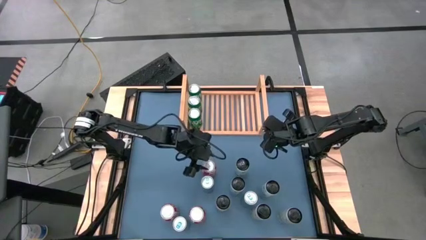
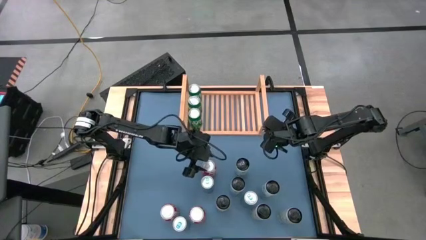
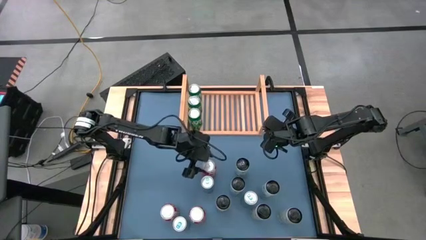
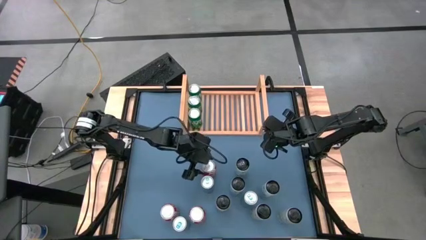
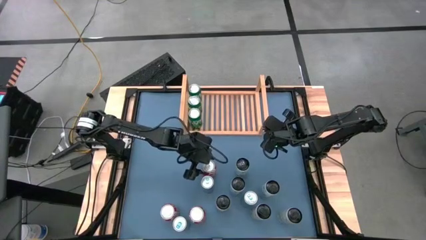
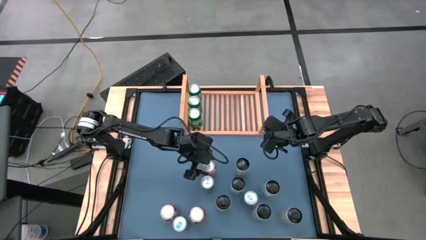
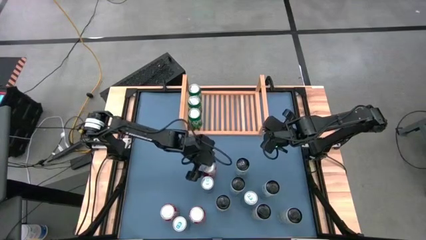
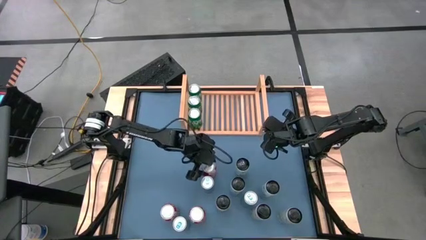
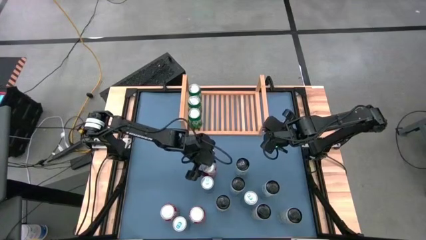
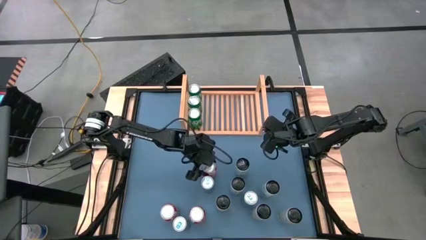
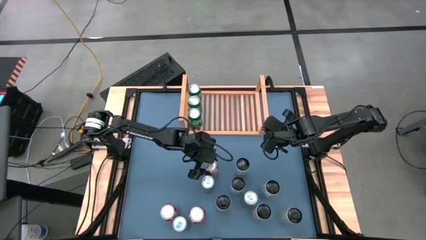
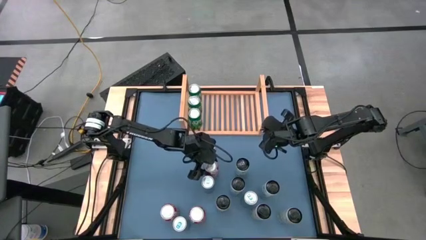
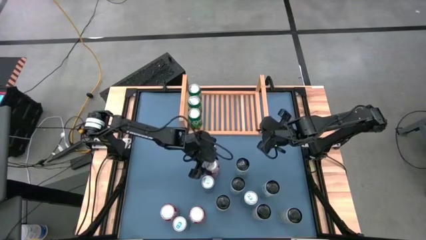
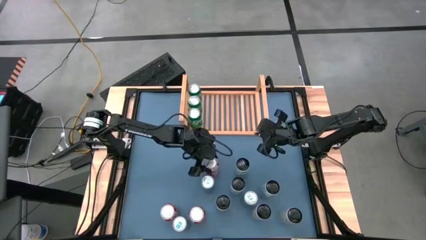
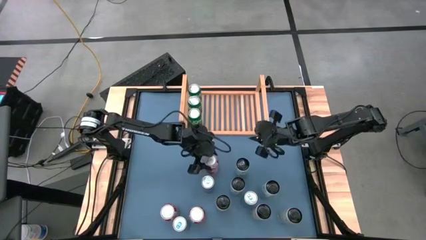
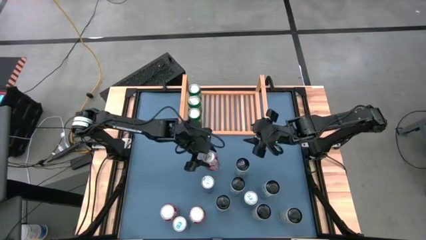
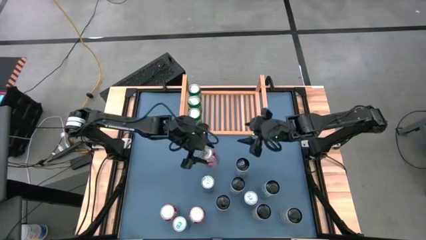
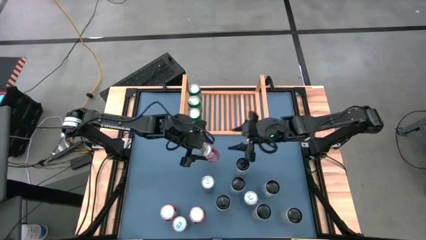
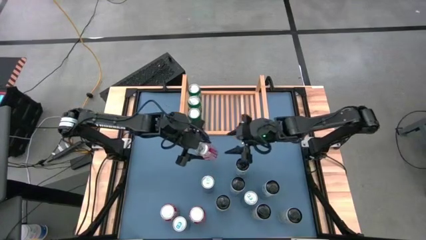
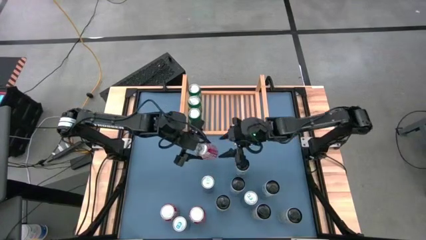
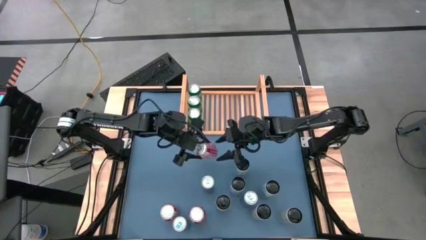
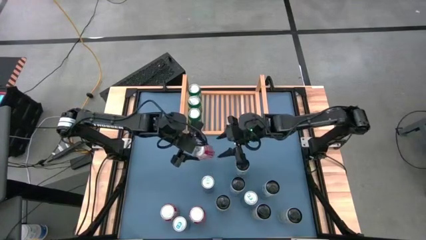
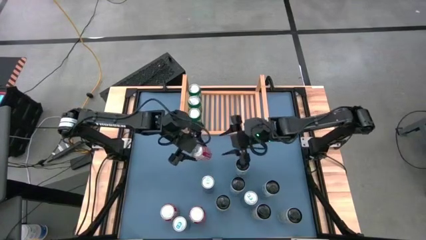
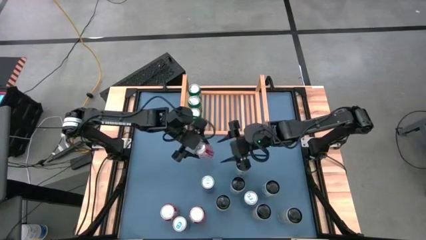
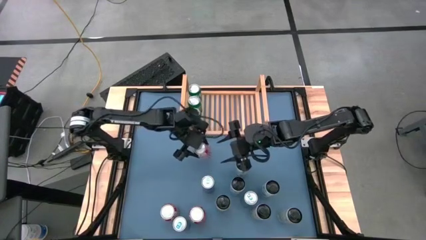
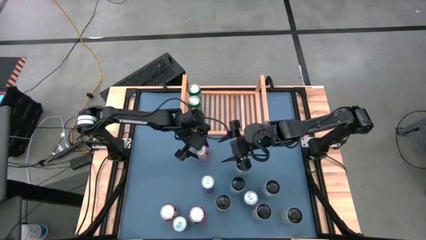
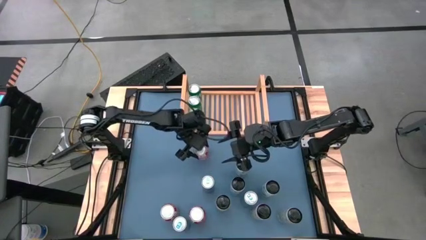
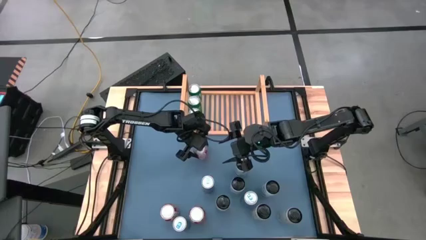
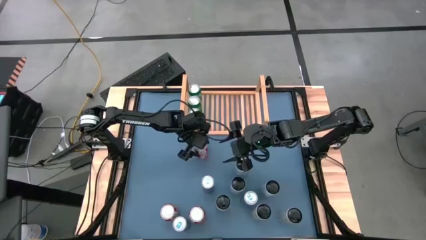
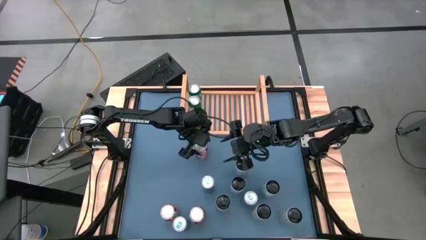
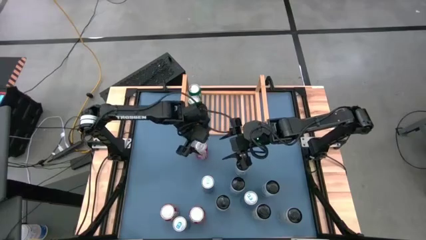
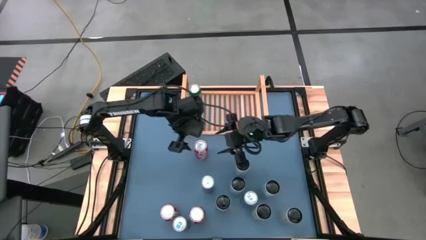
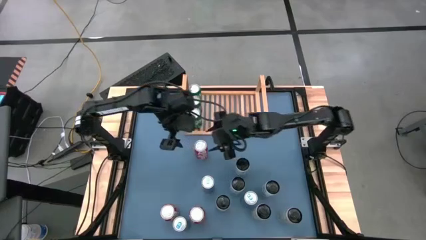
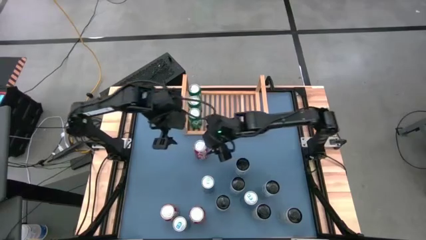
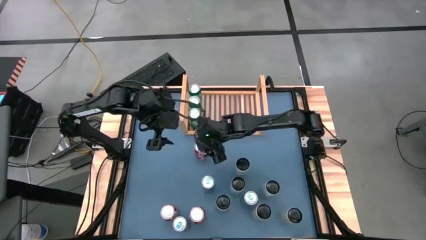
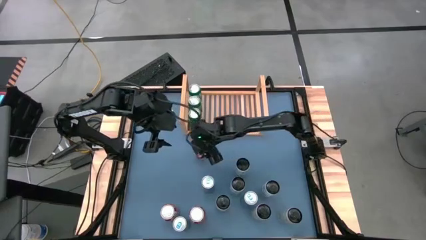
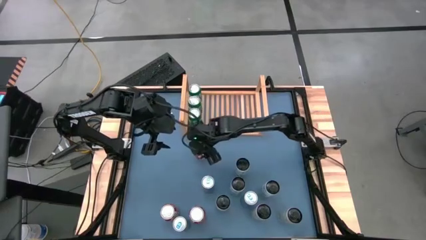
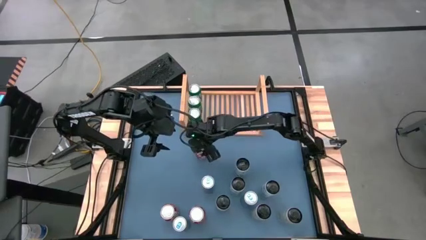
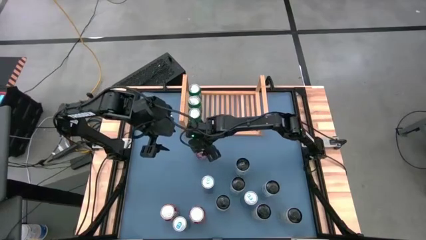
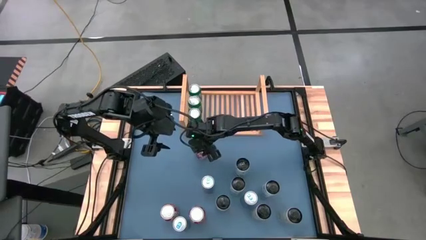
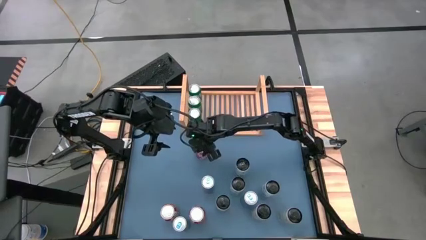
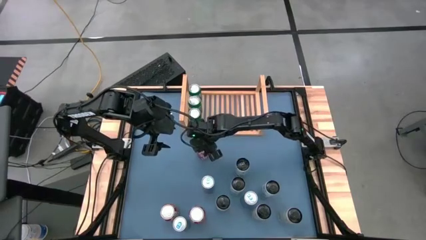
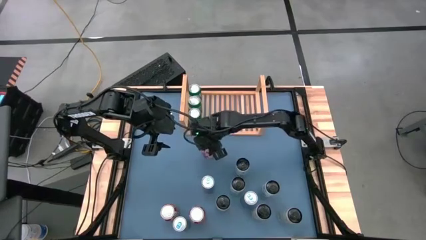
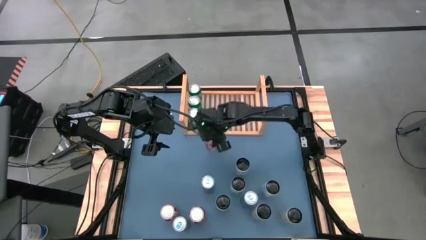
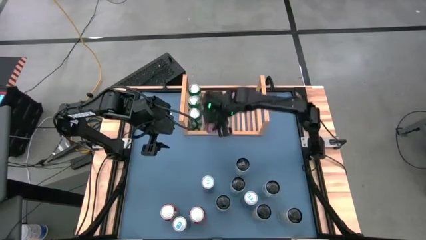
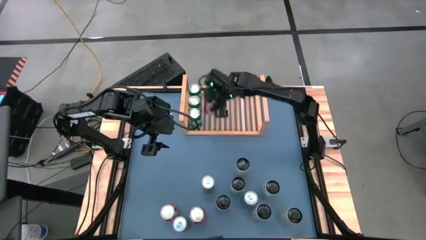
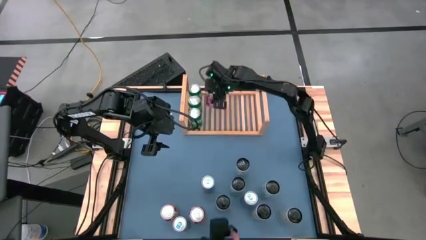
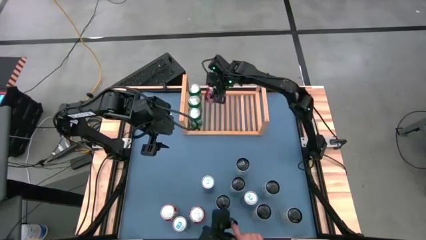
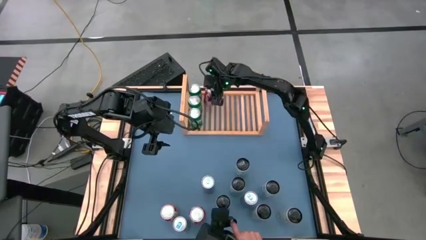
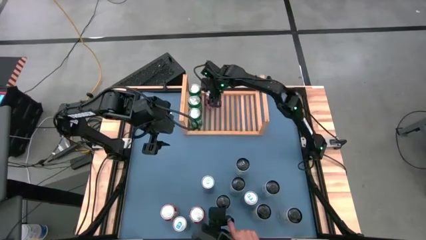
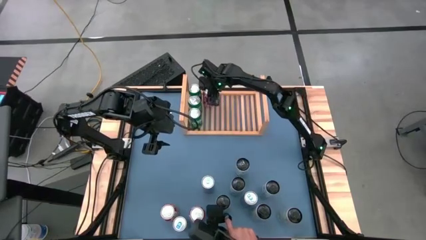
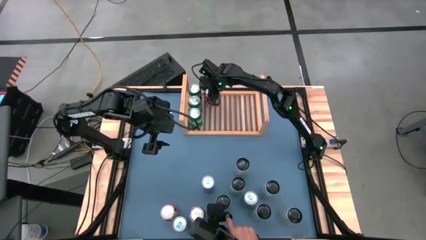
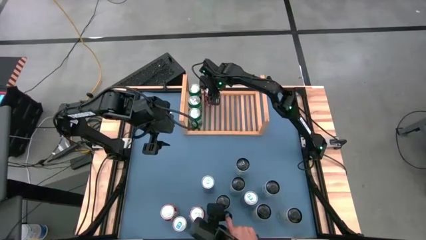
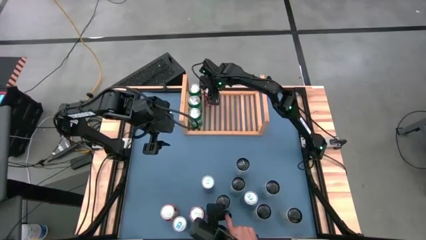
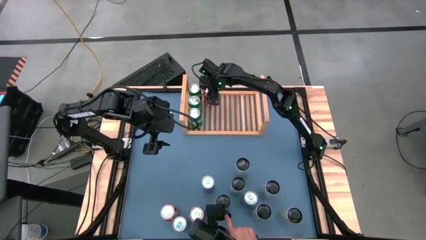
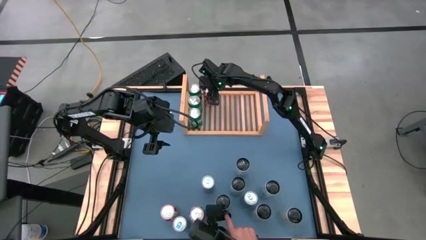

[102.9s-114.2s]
Task: Place canned beverage on shelf
Put the top left red soda can on the shelf

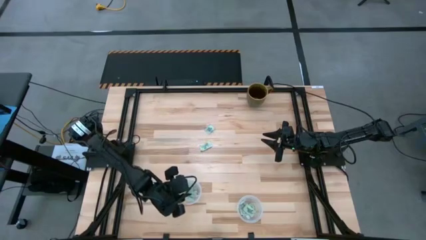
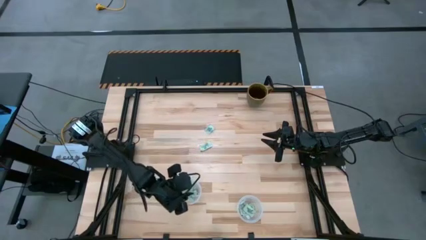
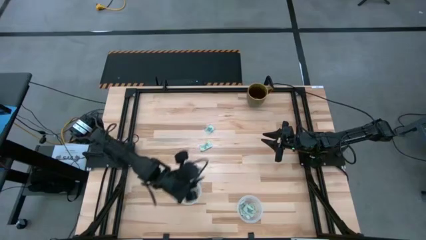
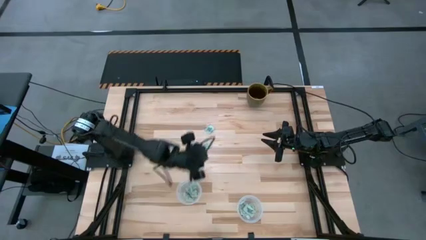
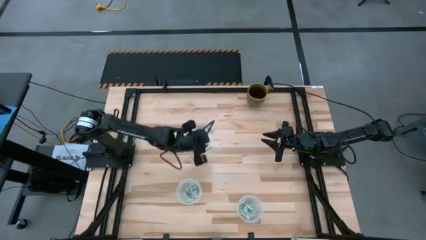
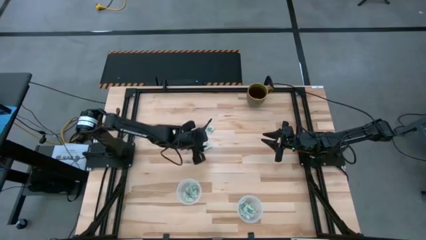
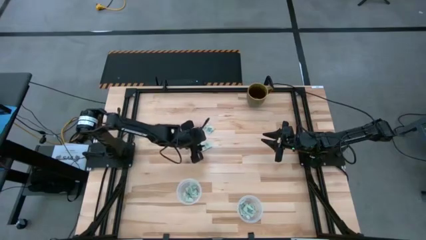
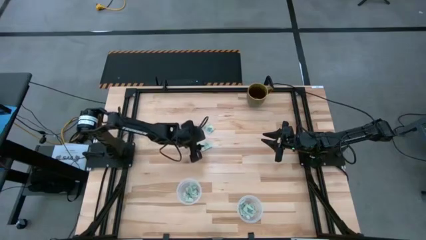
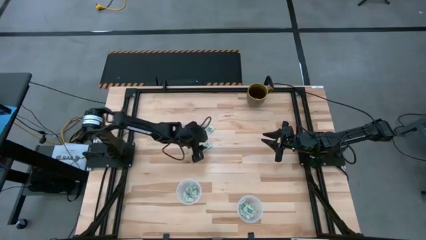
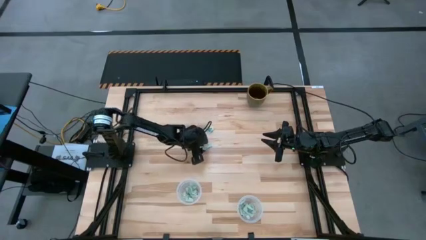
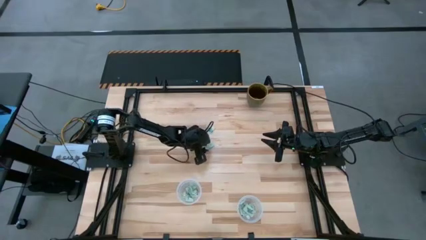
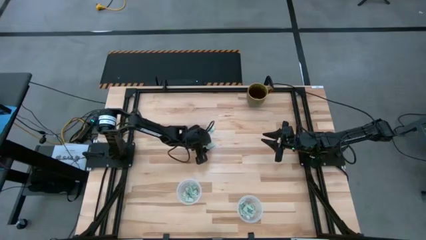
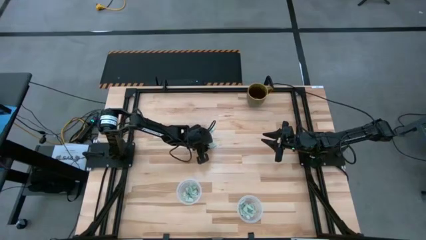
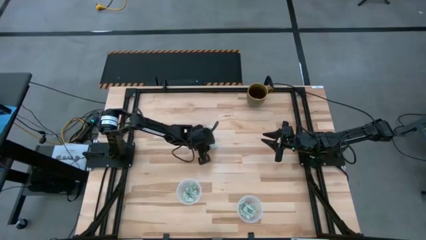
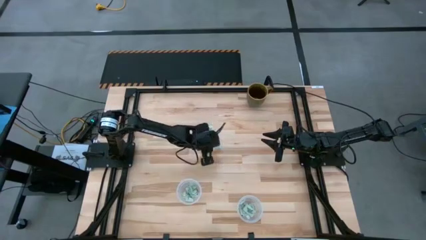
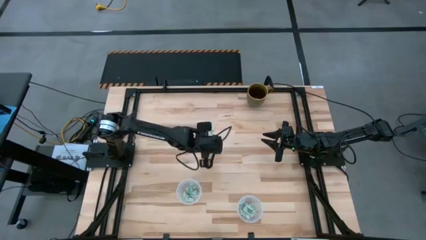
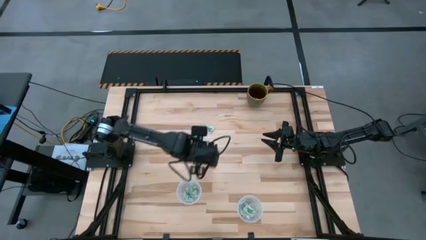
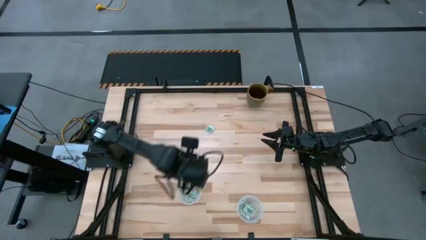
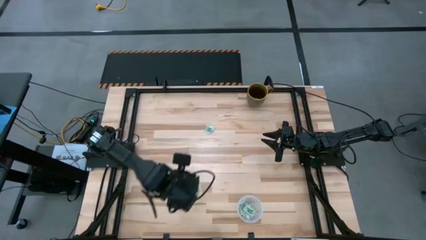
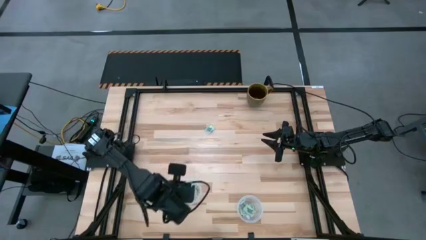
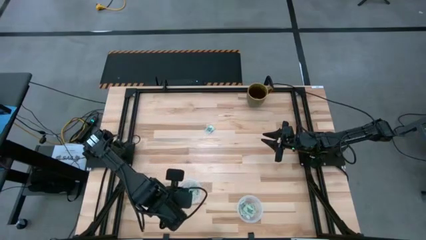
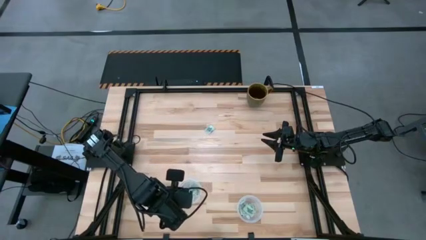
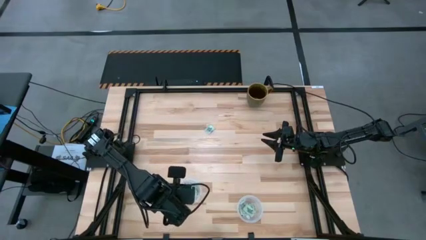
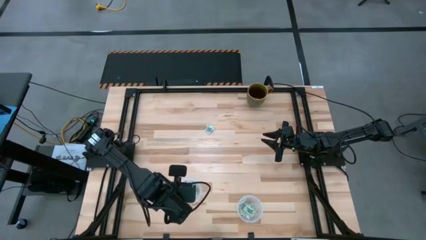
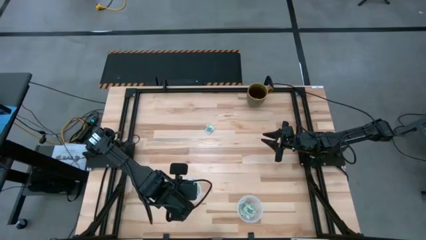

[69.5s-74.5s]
Task: Pick and place items into bin
Put the stevia packet into the left transparent bin
